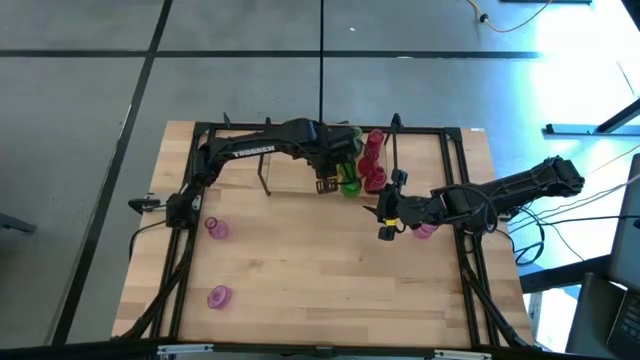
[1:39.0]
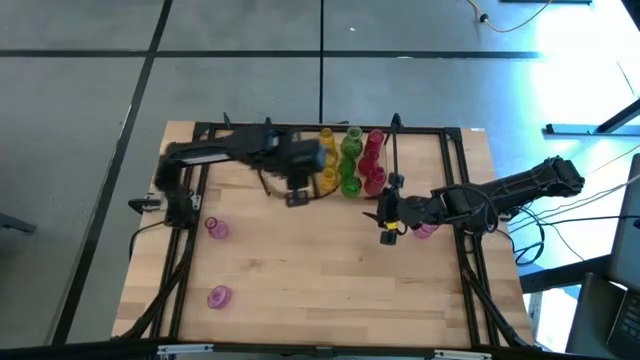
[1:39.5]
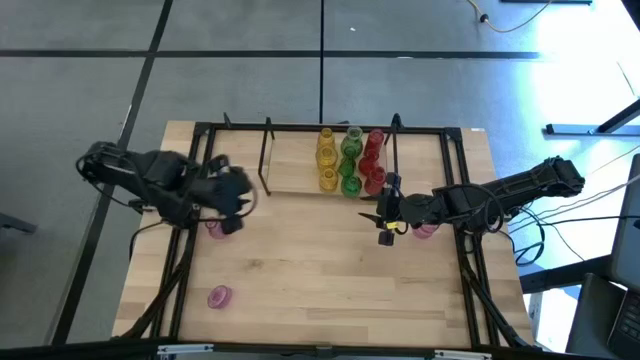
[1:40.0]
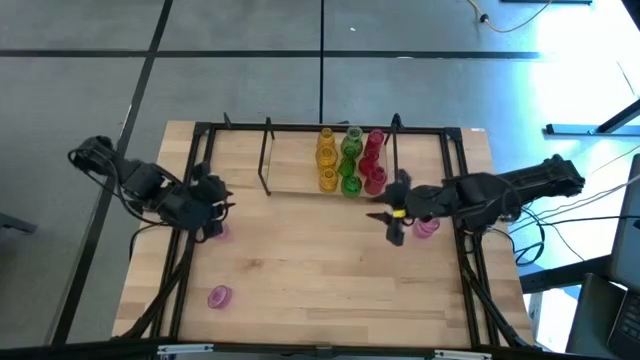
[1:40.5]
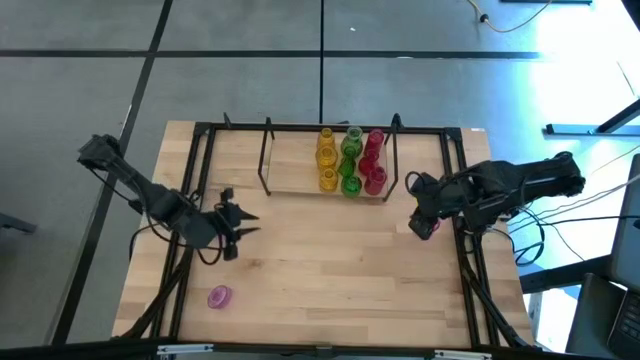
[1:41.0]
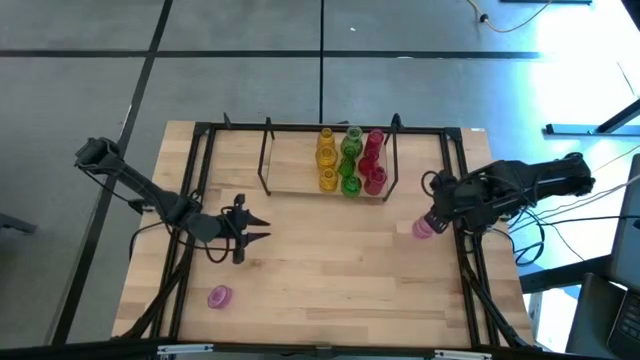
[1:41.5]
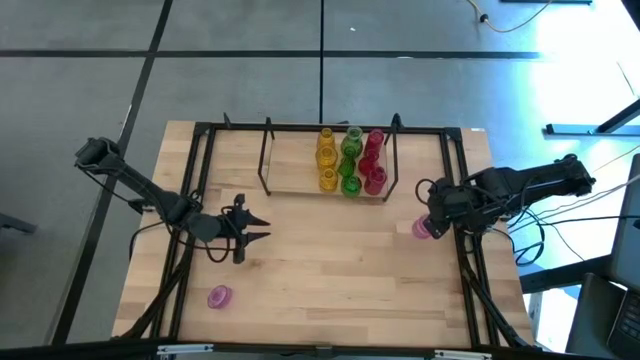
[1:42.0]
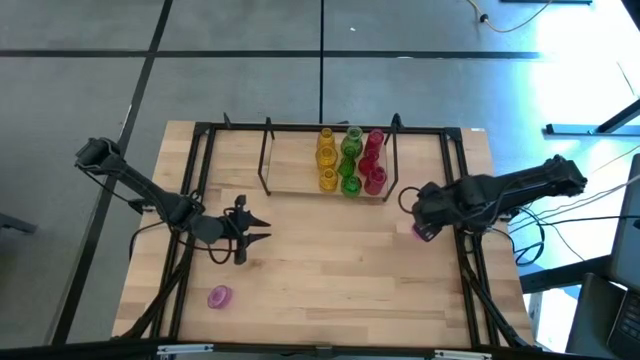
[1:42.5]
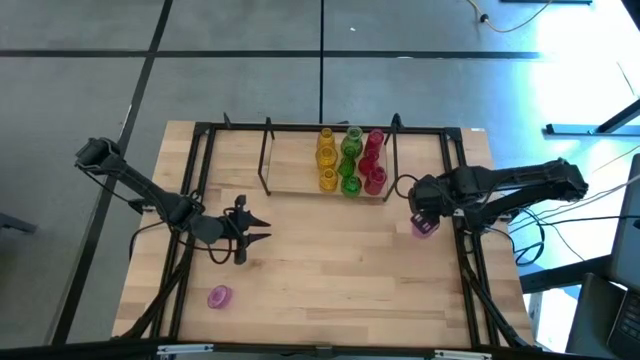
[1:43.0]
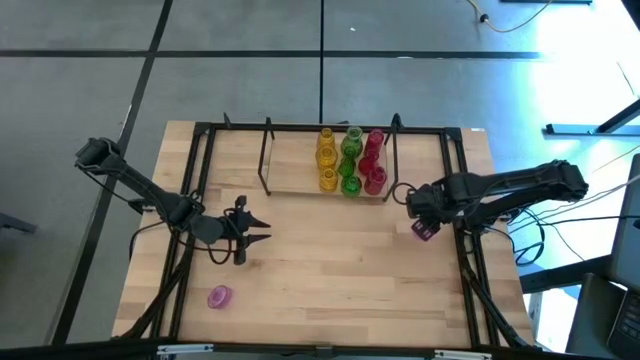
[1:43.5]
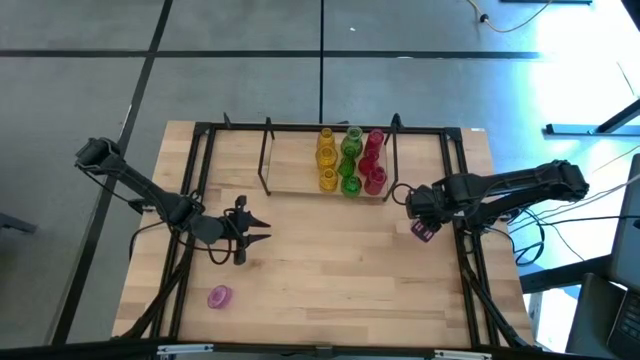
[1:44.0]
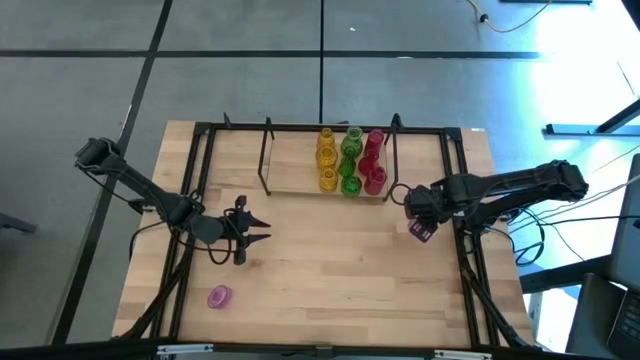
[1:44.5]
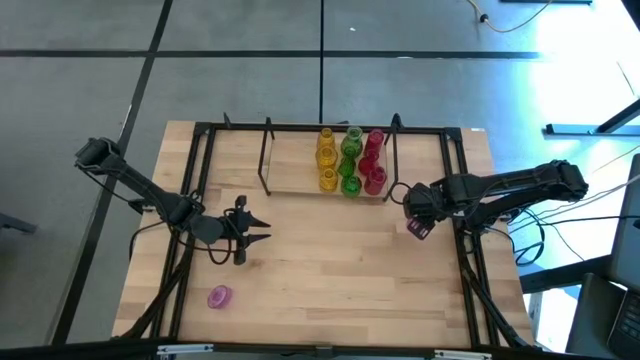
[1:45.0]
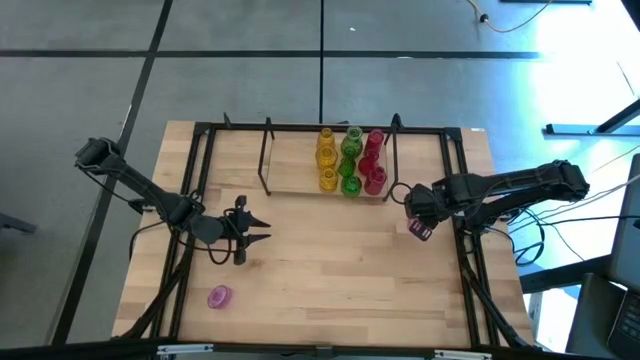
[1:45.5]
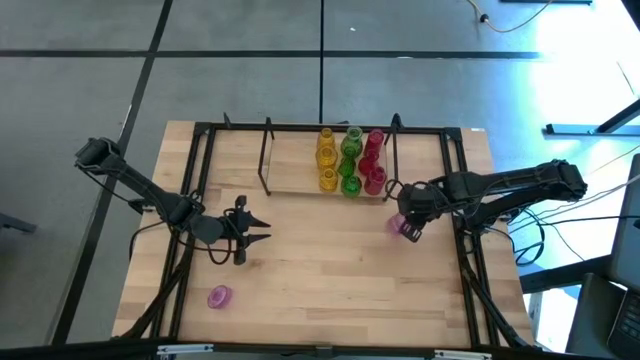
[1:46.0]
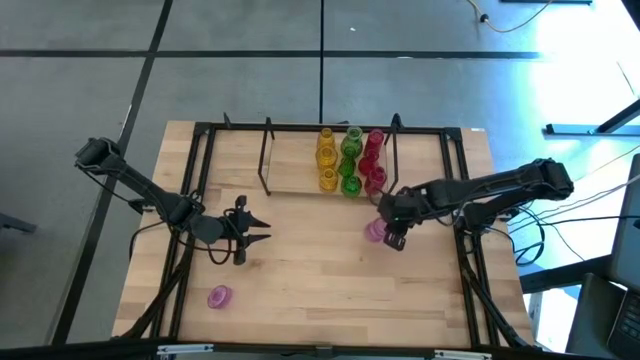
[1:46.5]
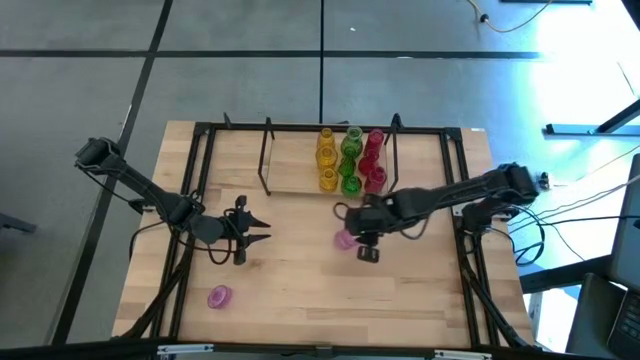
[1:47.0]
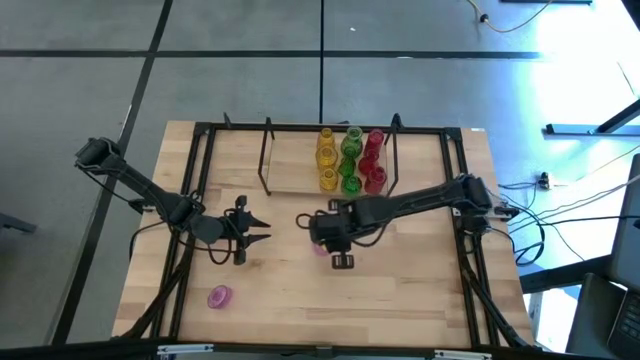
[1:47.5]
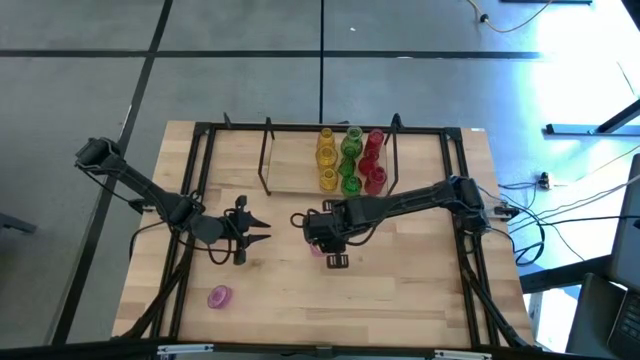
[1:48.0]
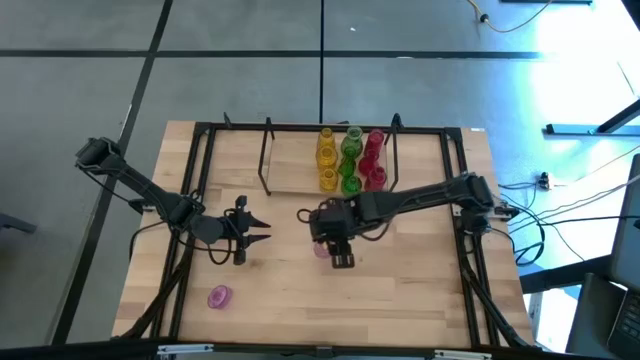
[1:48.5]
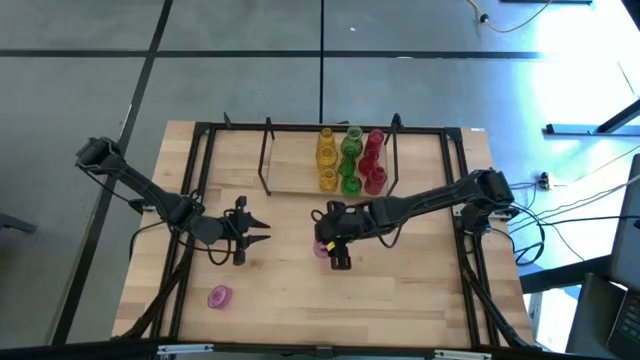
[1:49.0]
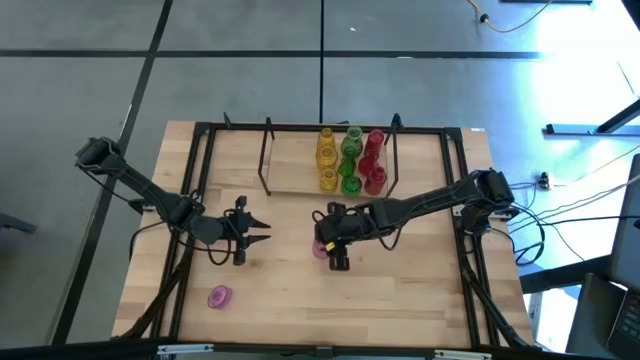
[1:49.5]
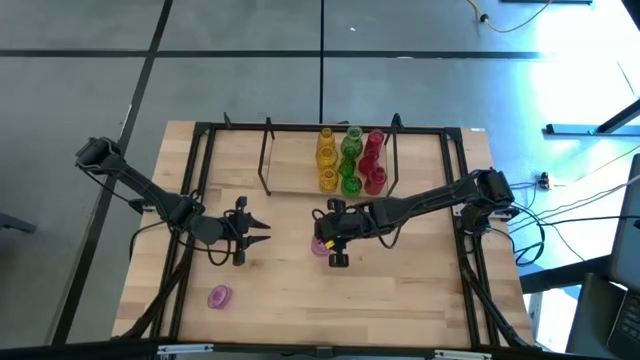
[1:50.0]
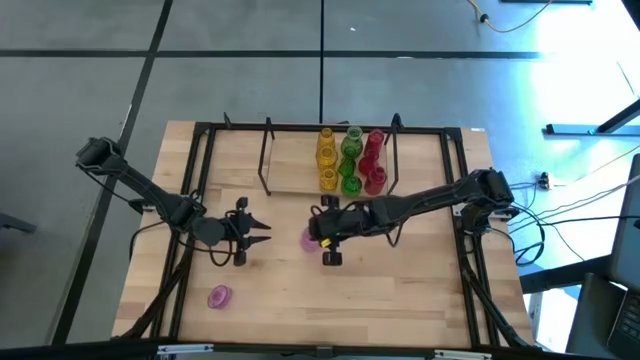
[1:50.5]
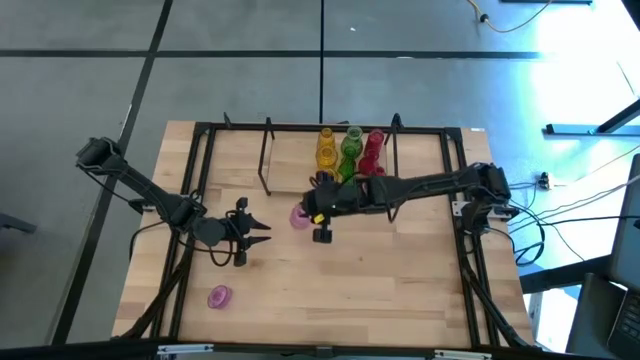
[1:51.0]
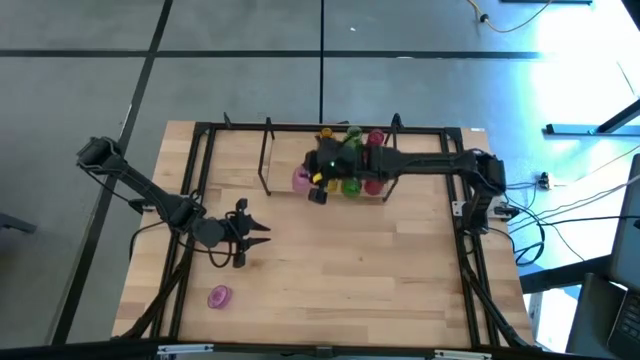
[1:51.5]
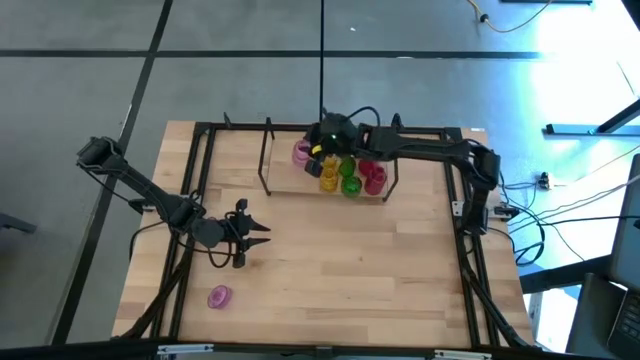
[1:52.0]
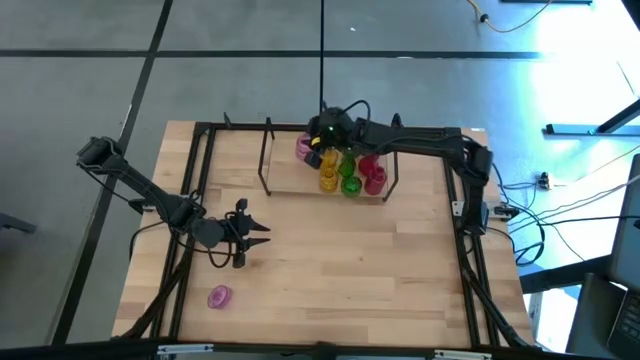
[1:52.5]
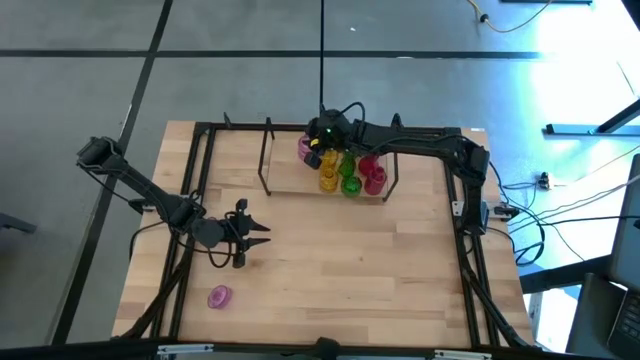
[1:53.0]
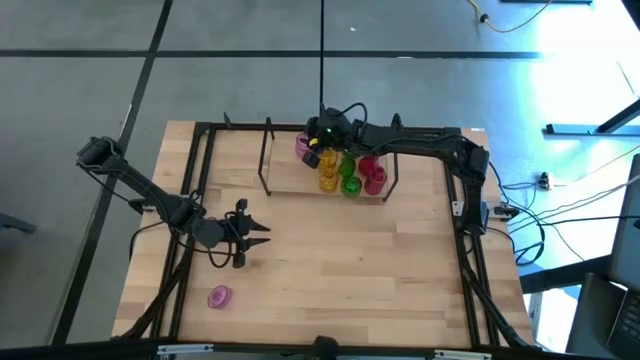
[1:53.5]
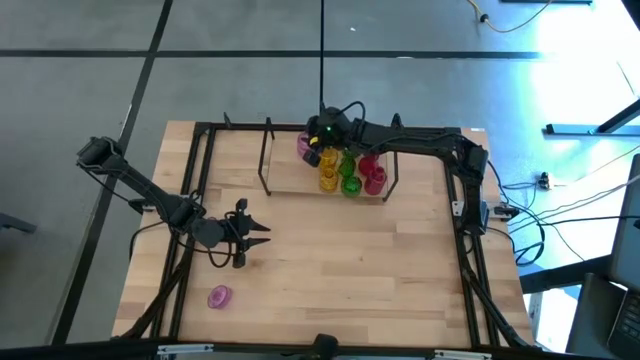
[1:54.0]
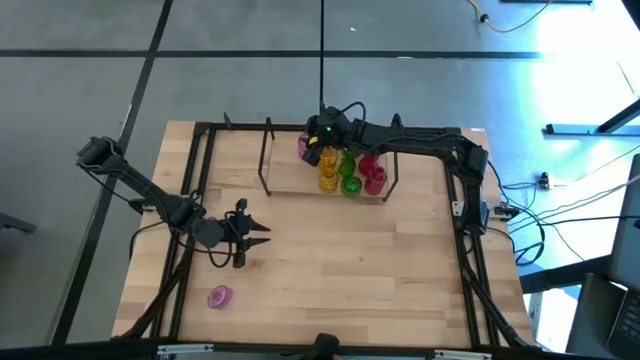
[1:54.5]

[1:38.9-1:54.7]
Task: sort vases onto shelf
Put the right violet vase on the shelf

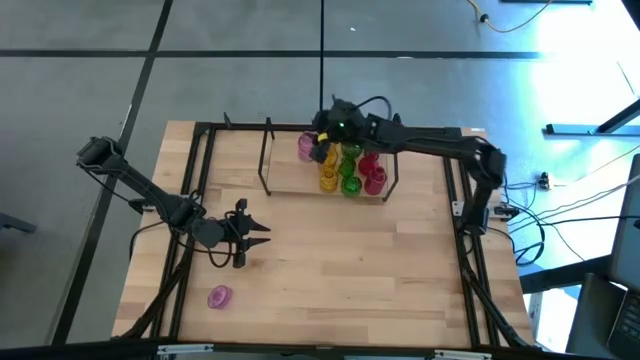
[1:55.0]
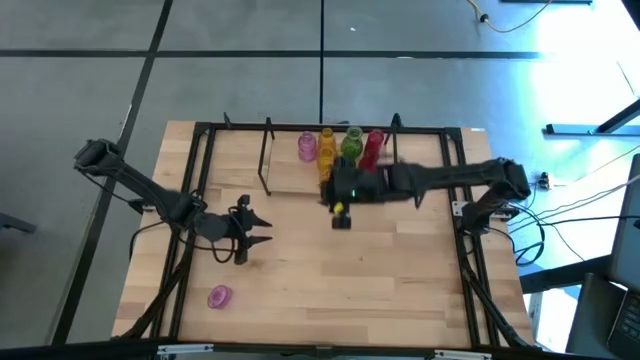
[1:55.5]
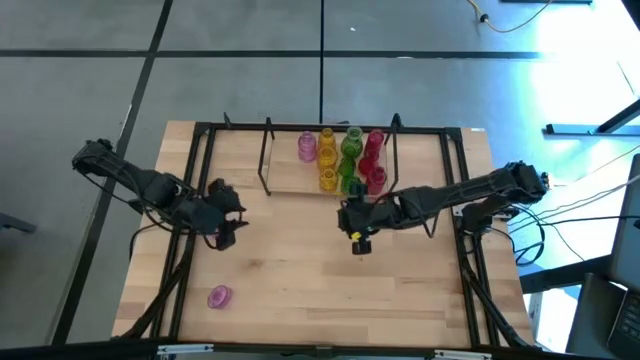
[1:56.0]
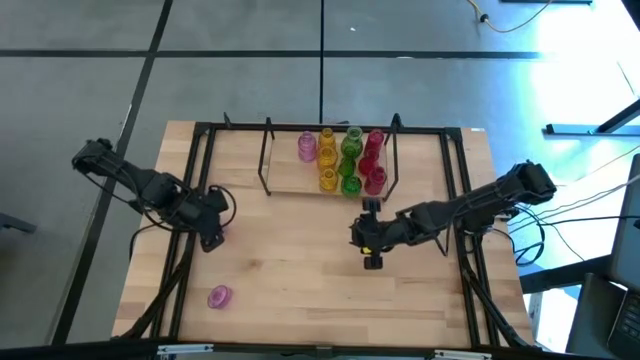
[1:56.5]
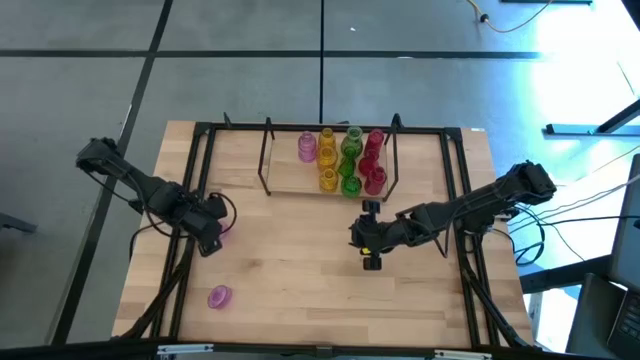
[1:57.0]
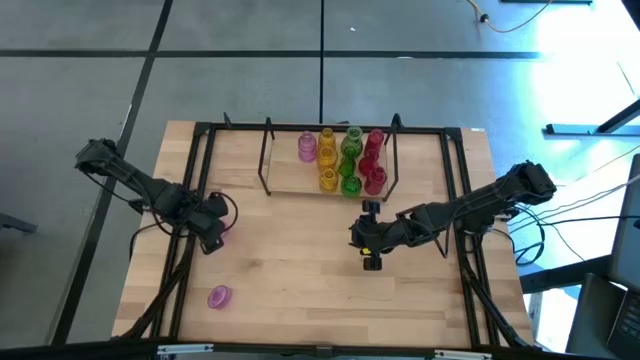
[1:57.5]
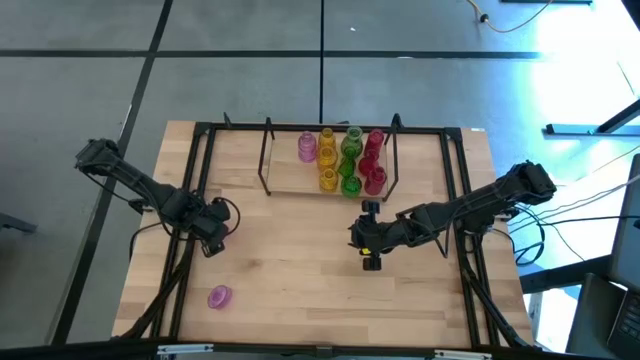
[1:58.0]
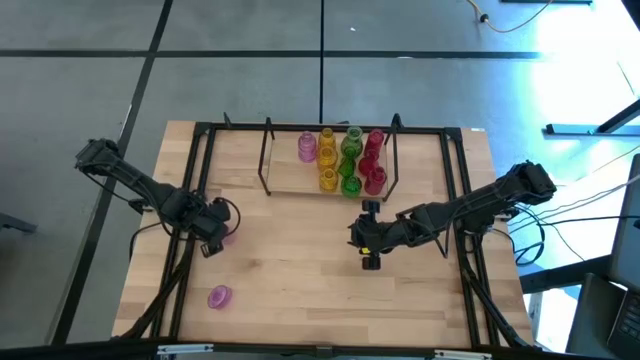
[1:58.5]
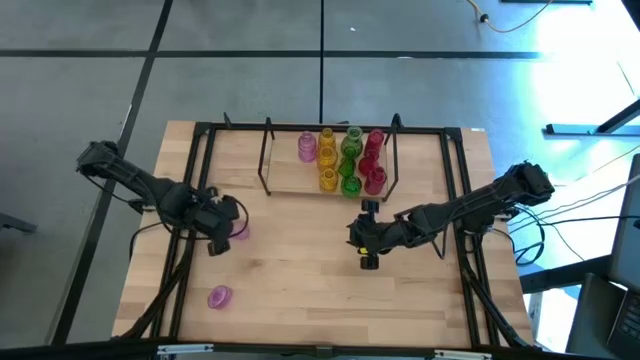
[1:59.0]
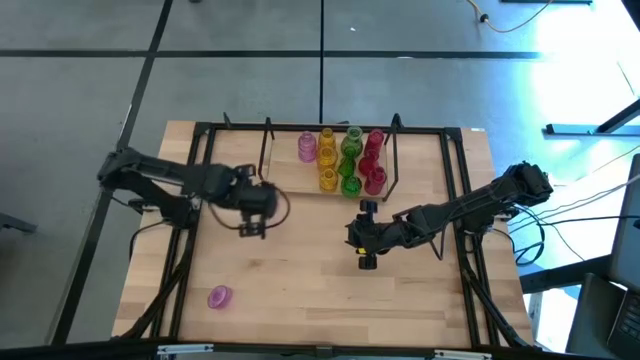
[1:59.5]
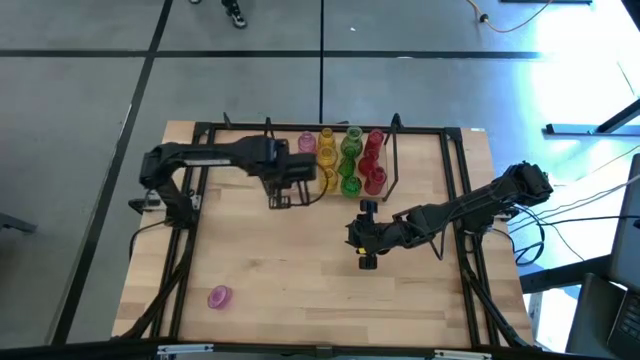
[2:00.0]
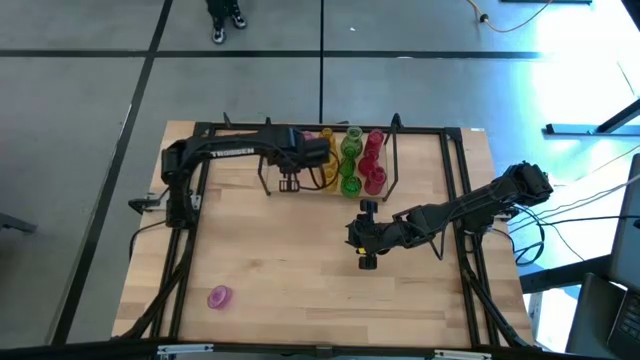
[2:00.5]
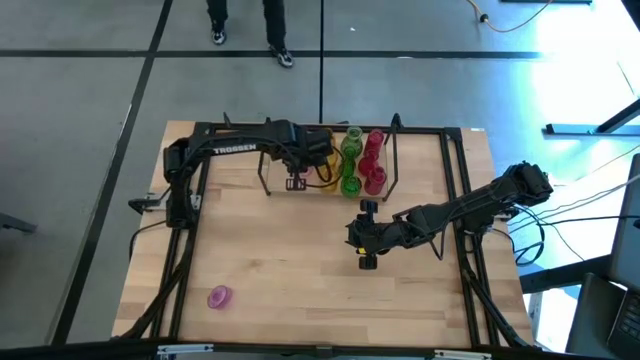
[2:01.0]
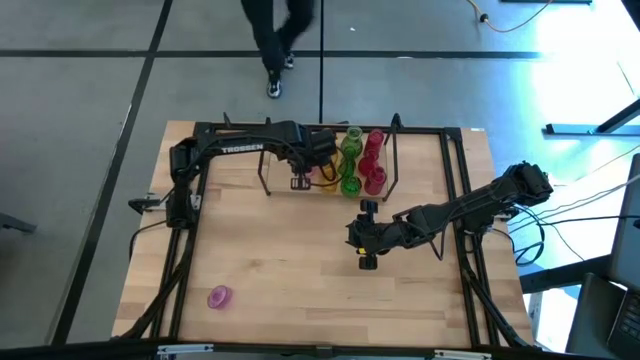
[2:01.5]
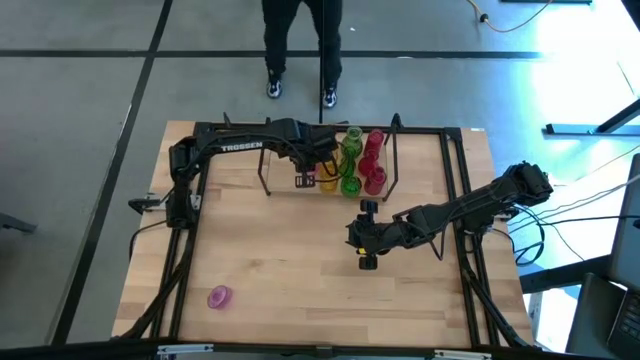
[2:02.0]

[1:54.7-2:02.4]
Put the top violet vase on the shelf aligned with the other violet vase
